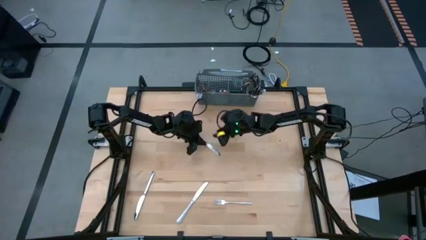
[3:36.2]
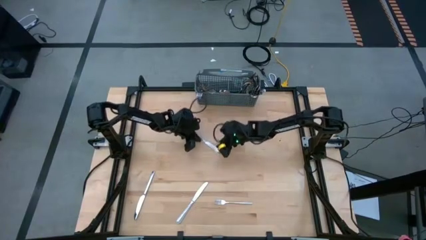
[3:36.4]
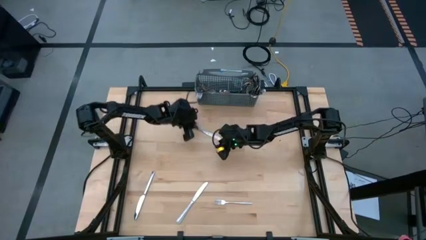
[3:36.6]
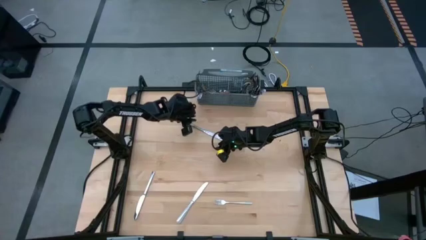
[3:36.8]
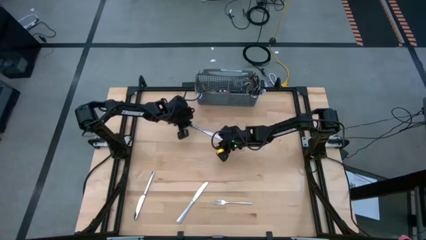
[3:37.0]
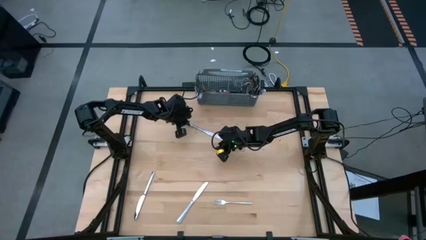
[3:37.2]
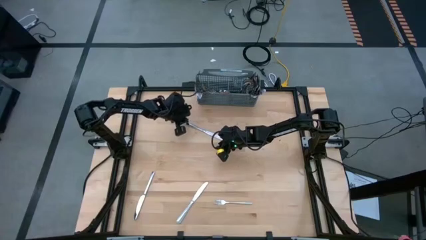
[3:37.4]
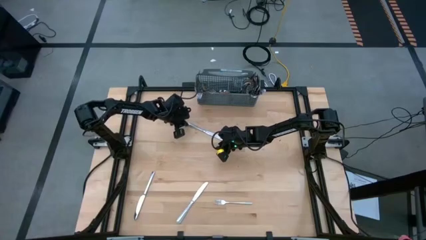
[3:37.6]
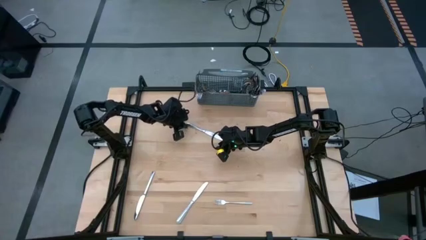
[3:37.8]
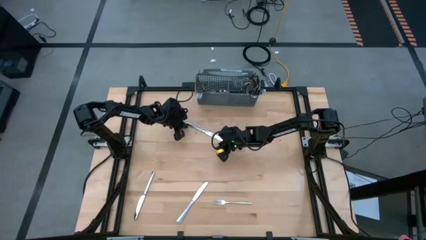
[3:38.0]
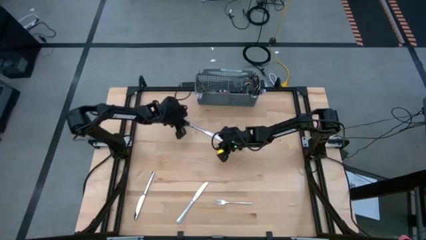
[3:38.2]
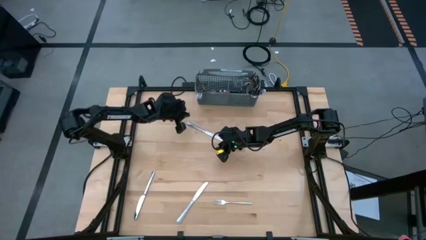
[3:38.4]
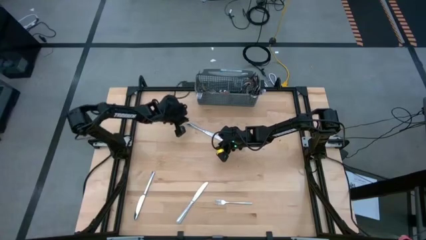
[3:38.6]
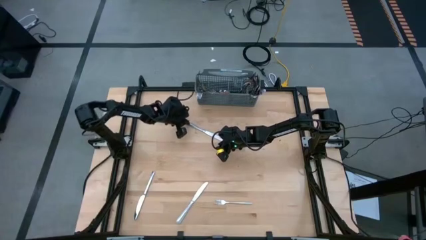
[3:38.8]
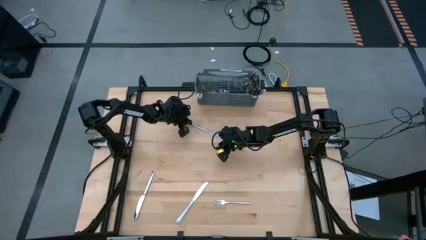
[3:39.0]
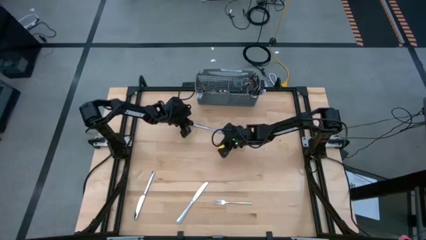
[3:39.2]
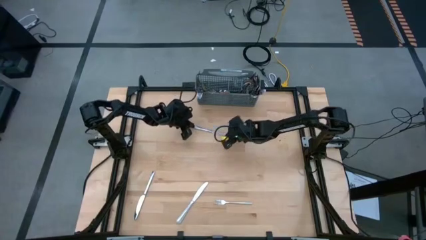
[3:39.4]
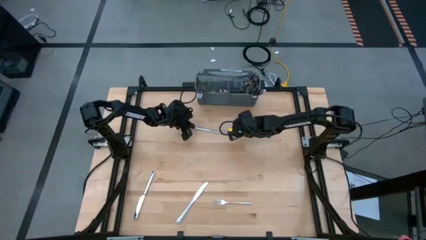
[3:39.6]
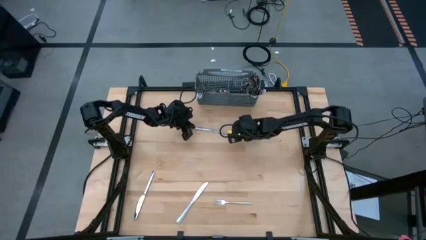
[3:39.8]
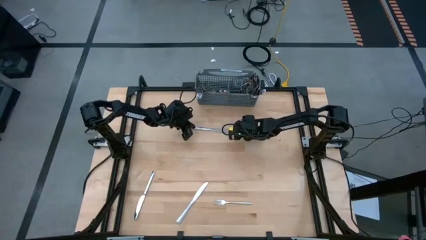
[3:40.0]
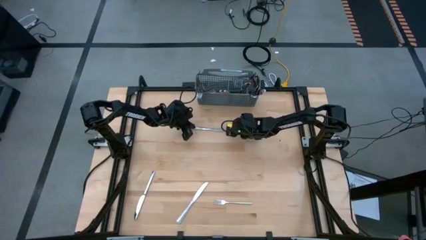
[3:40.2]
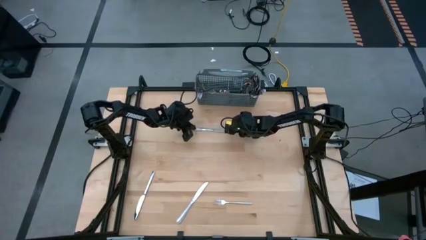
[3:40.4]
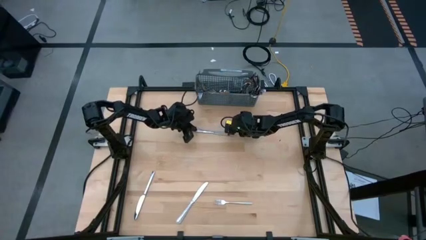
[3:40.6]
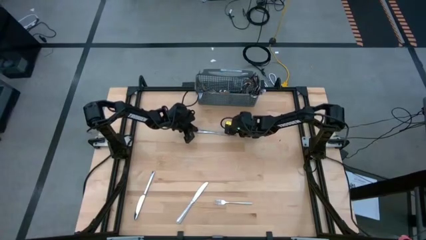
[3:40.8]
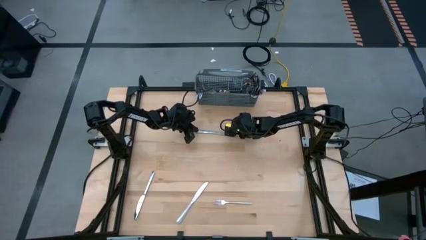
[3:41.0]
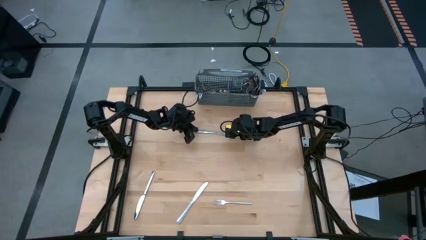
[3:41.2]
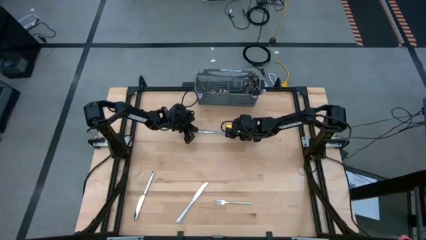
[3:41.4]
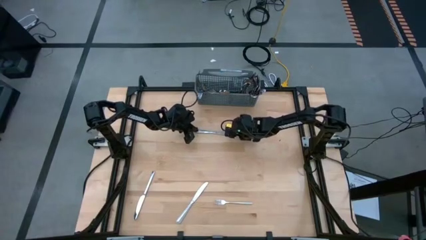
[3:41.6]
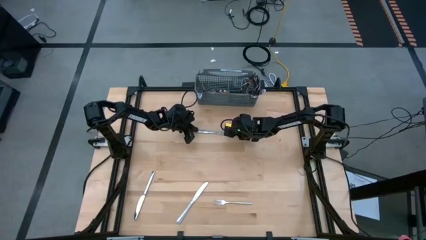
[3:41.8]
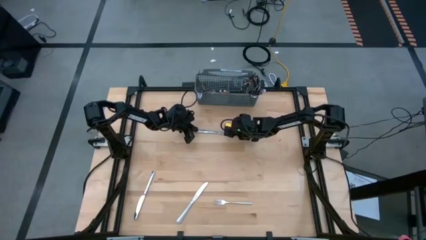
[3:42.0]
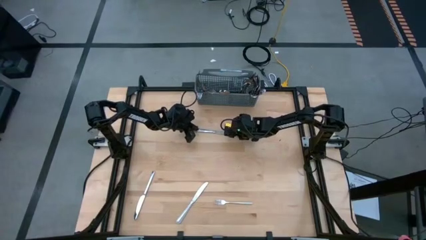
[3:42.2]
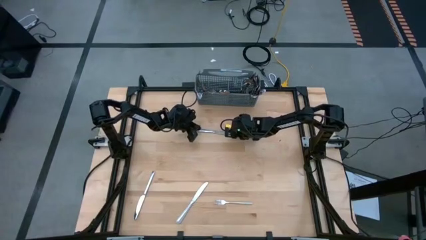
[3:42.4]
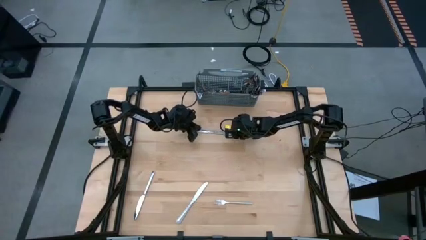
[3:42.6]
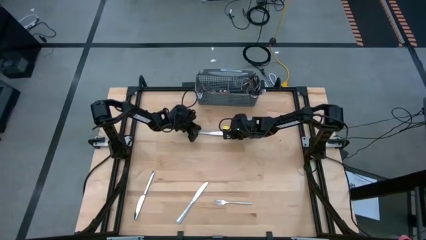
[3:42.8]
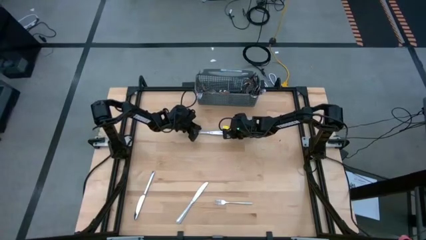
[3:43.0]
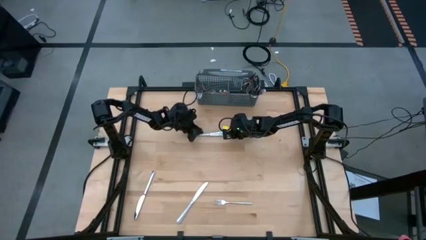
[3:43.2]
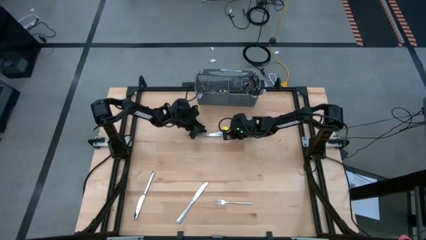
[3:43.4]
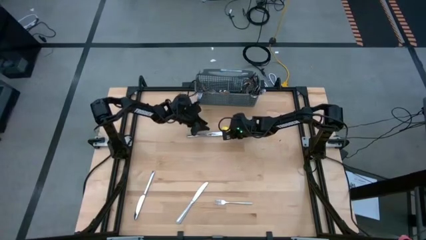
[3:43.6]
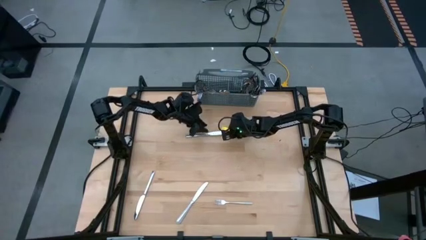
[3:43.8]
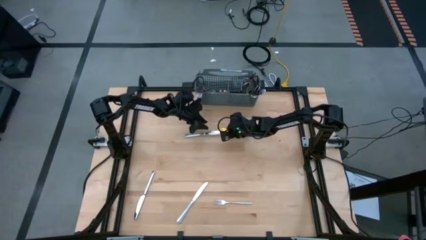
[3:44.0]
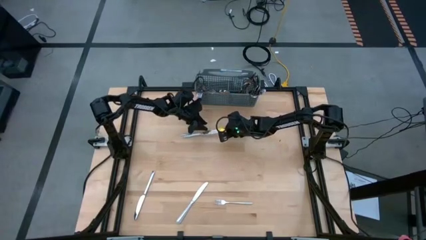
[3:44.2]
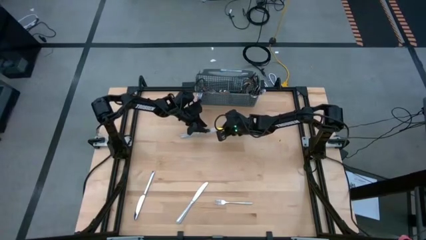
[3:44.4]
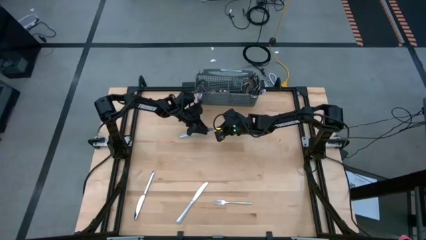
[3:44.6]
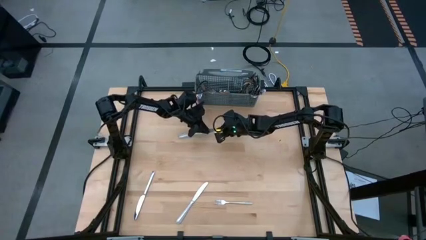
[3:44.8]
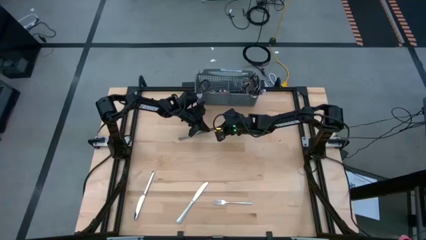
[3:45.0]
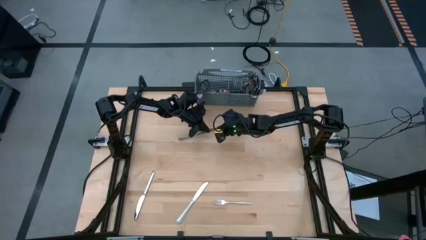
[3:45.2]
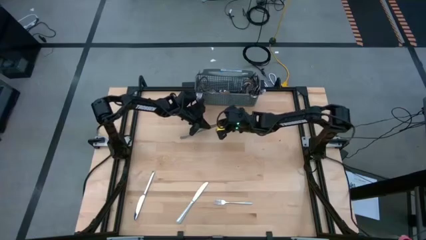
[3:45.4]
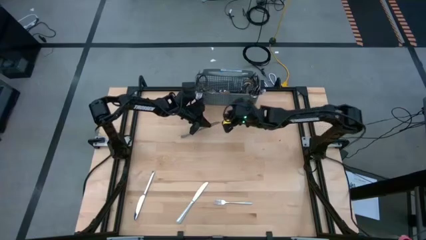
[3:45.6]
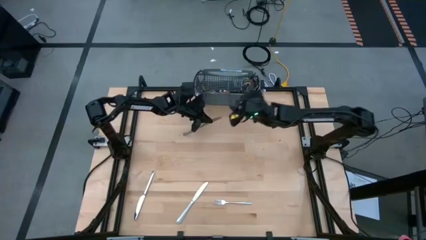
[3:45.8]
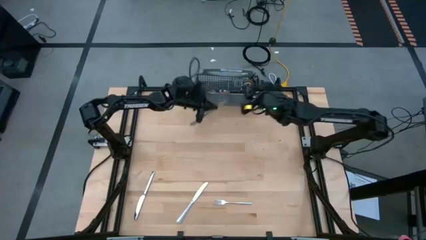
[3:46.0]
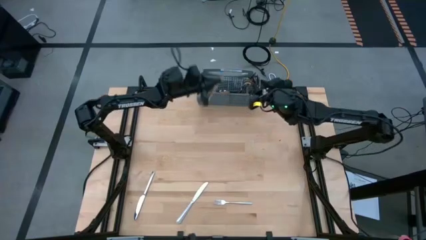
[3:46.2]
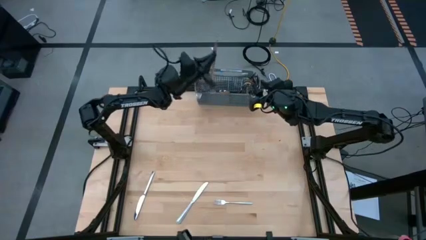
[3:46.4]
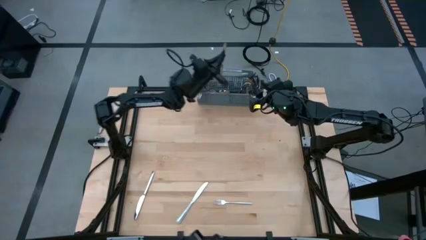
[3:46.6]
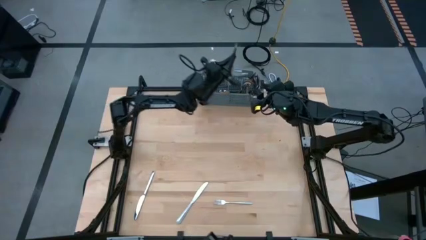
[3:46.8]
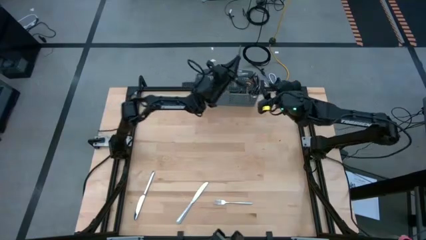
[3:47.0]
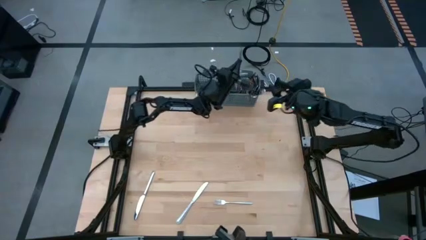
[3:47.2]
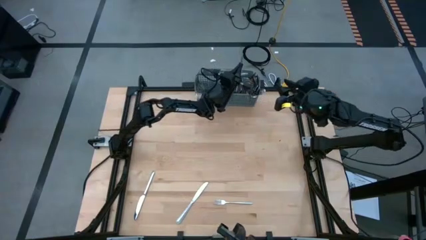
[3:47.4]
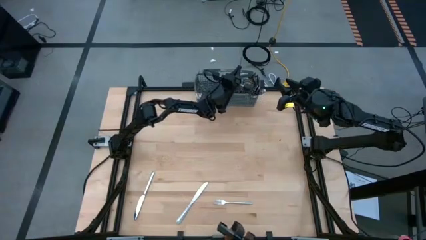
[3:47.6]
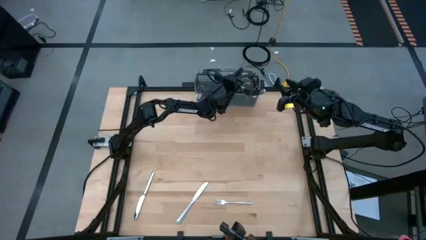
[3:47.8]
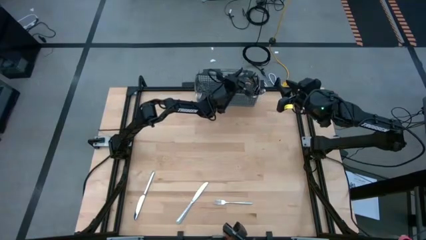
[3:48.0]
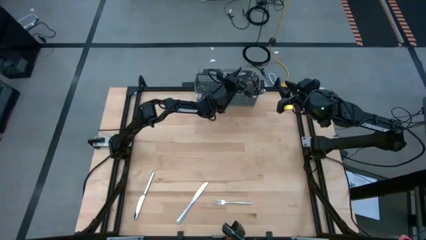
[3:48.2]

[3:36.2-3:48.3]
Task: Sort silverware
Put the silver table knife into the silverware organizer

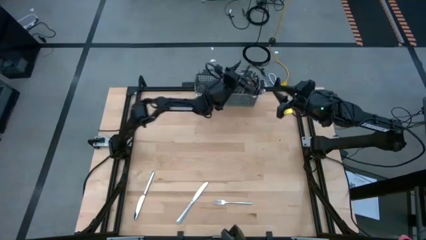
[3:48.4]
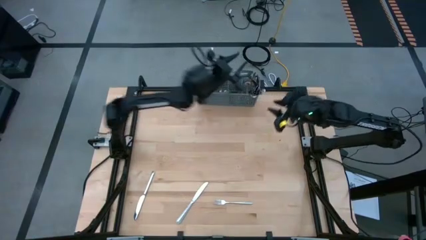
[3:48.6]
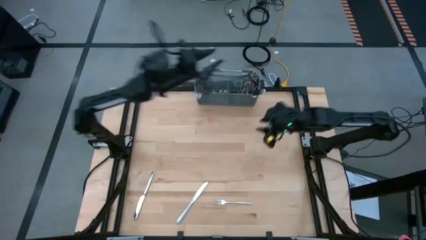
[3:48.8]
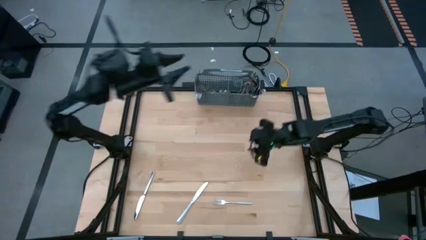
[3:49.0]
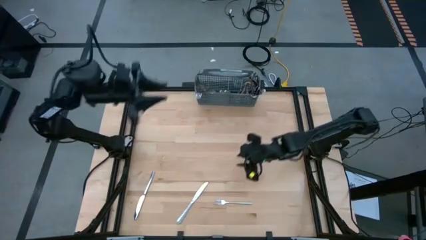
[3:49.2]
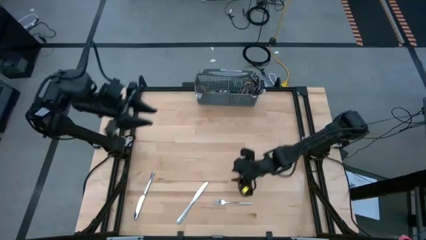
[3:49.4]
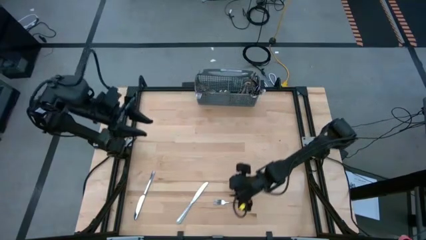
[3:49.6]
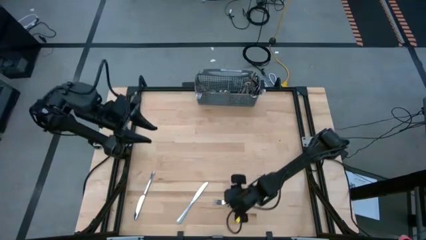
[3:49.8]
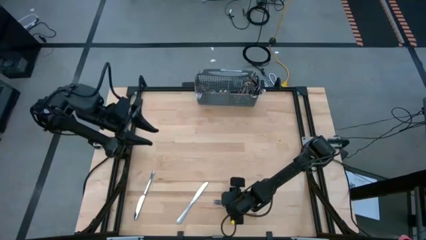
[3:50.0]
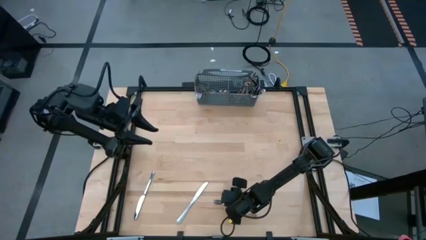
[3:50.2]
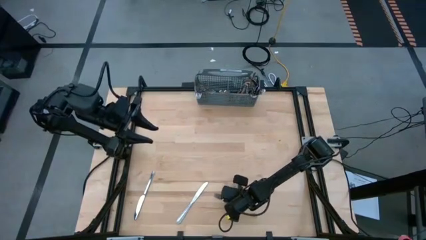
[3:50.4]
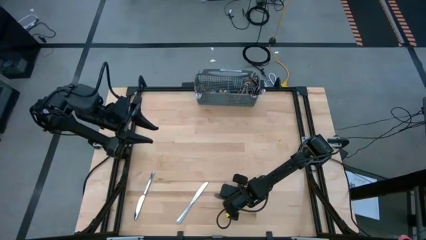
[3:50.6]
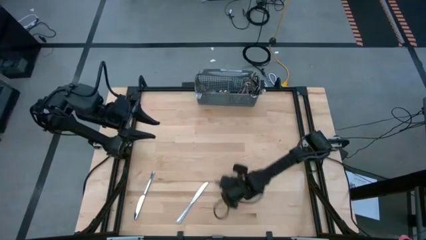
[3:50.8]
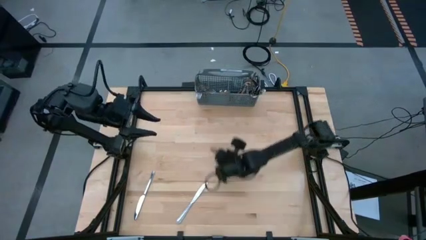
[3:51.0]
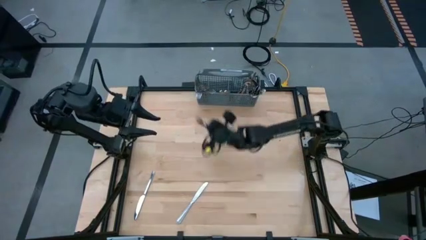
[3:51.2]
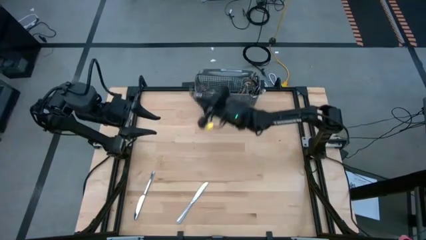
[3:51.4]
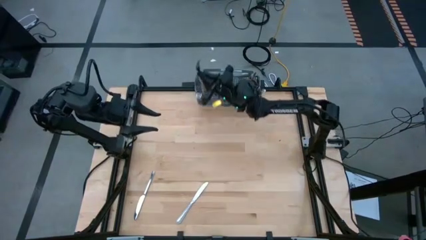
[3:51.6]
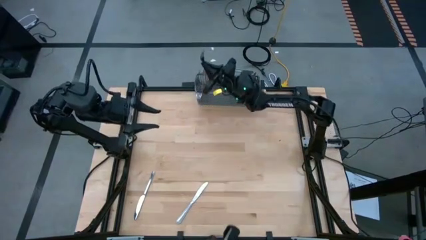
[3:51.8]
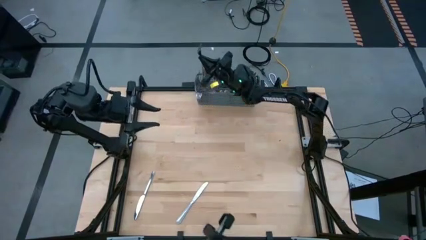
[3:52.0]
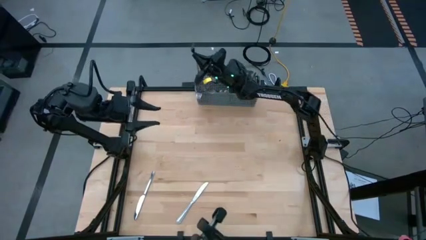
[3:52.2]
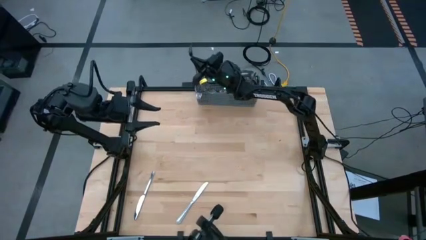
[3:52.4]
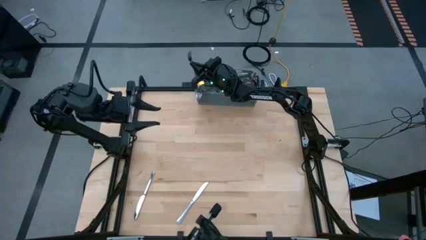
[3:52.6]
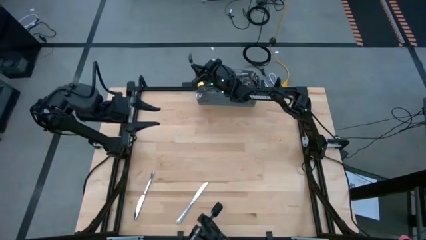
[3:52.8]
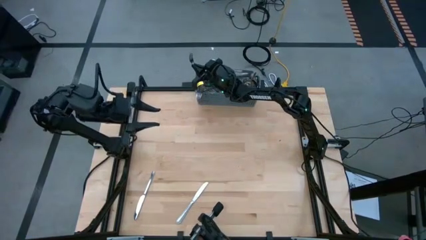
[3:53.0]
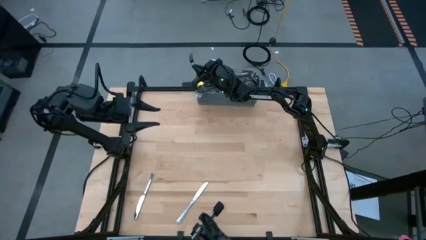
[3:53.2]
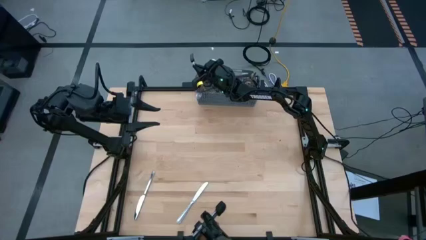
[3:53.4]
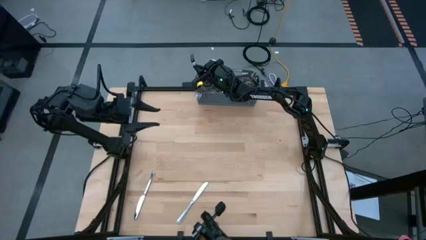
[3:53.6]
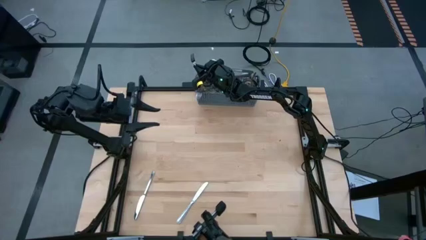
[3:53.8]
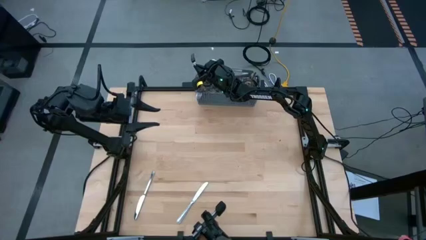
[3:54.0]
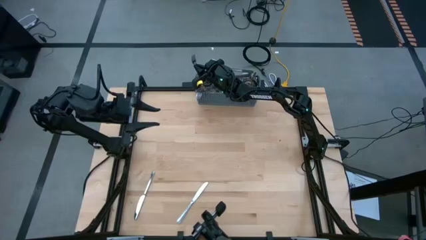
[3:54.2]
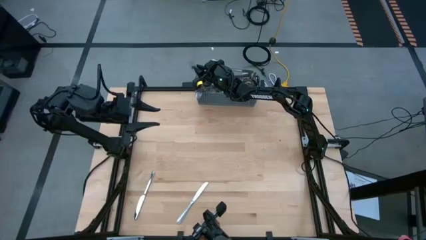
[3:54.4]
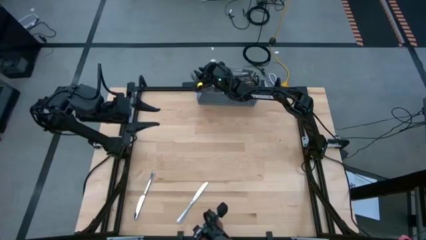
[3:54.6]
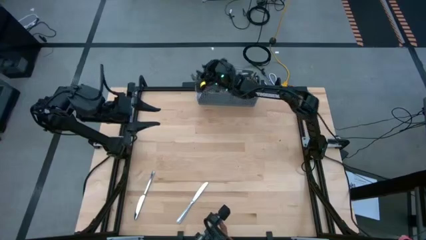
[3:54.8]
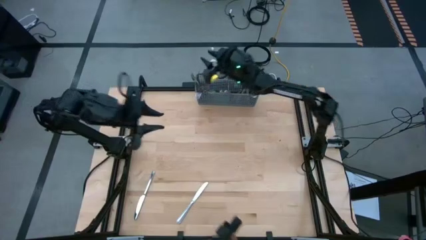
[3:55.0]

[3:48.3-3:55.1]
Put the silver fork into the silverware organizer
